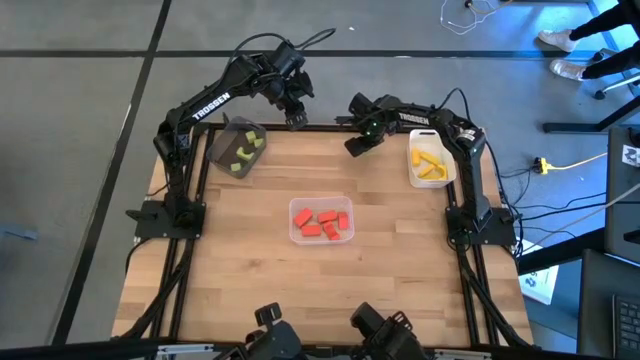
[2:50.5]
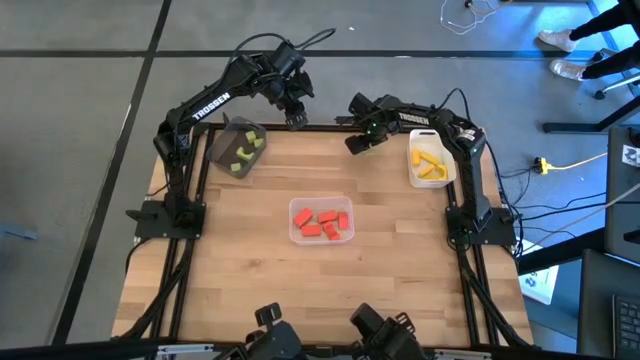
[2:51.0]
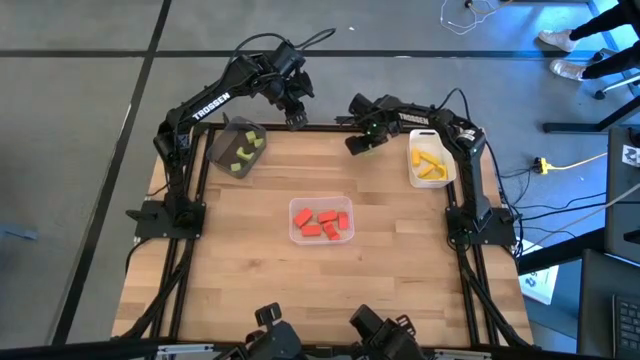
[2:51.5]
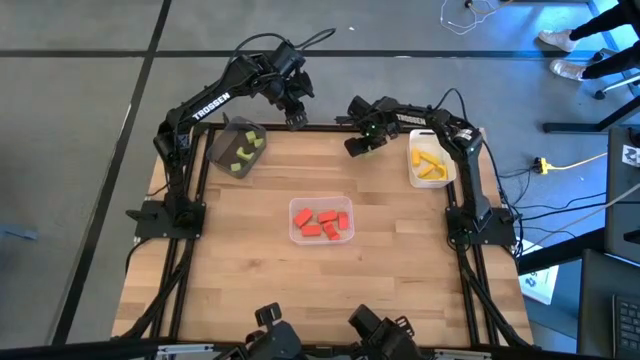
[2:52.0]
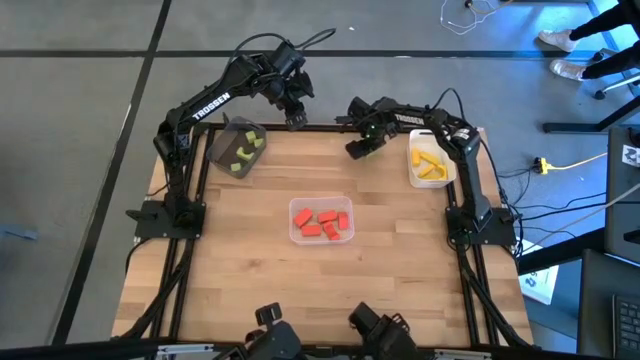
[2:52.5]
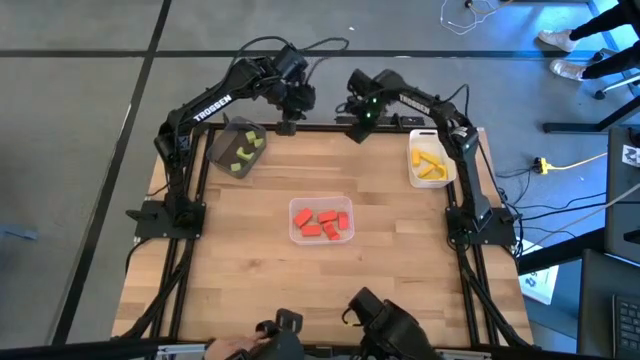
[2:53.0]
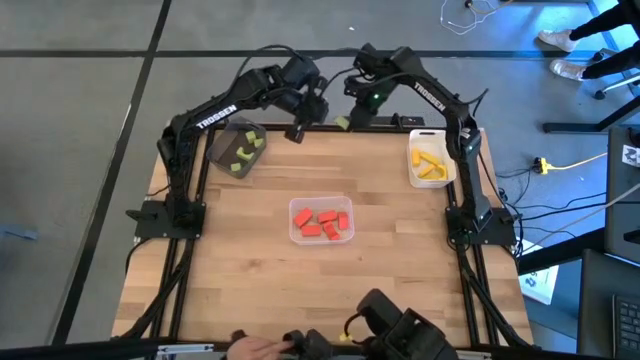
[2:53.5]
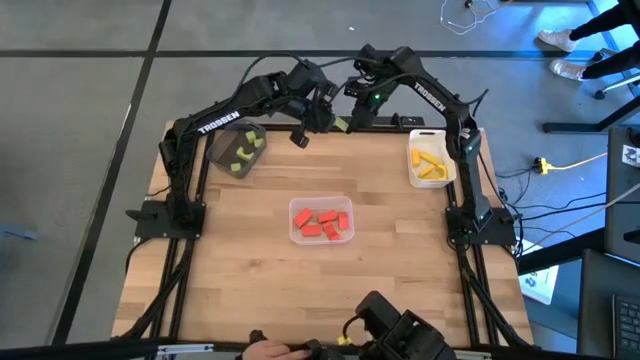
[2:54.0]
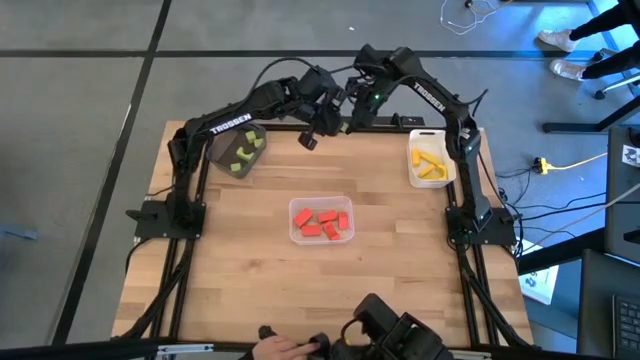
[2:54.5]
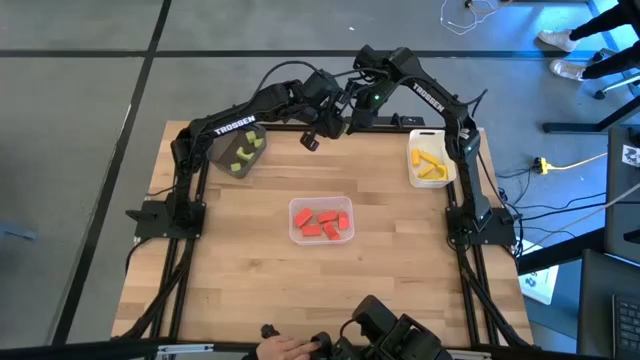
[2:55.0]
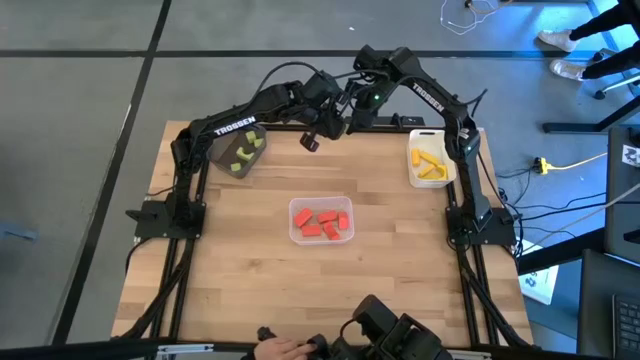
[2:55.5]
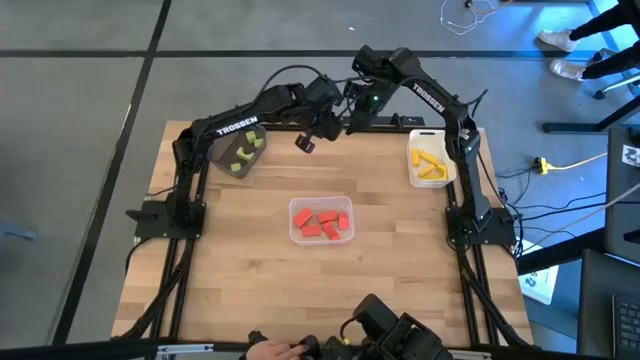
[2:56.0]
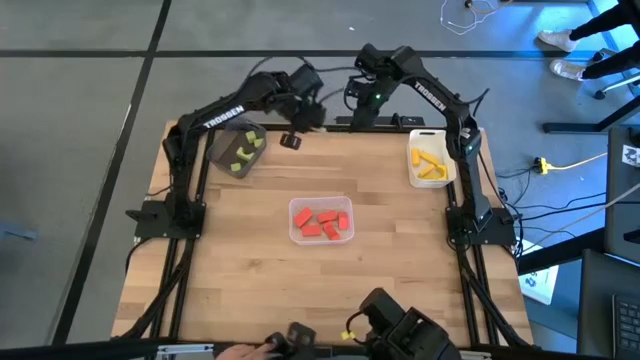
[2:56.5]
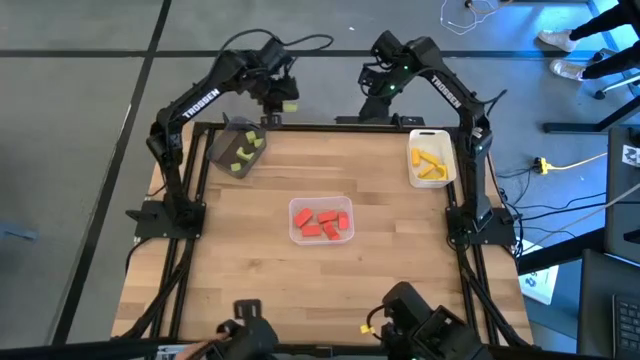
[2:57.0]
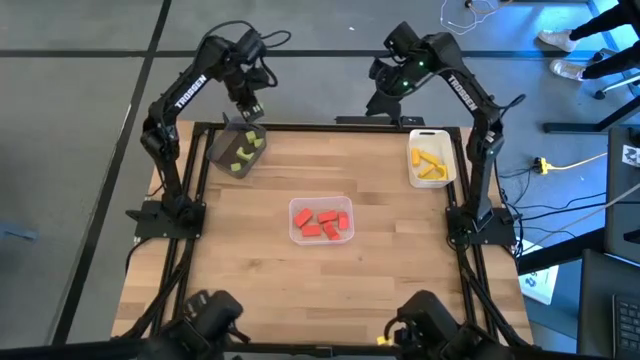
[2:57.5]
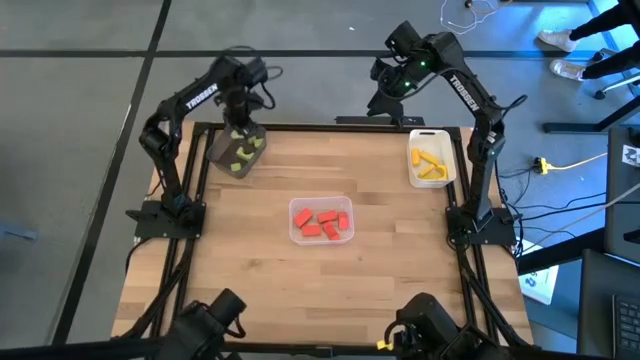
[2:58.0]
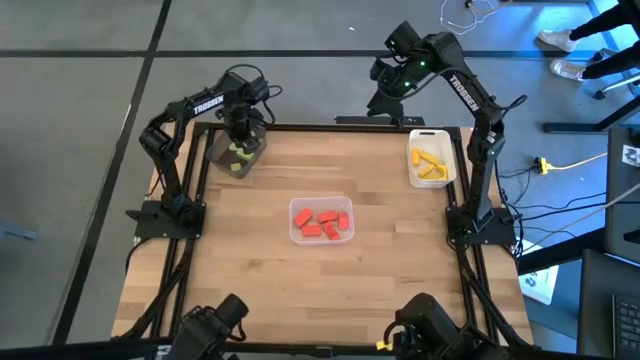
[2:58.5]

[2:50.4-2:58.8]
Task: Sort & place blocks by color
Put the green block into the black bin

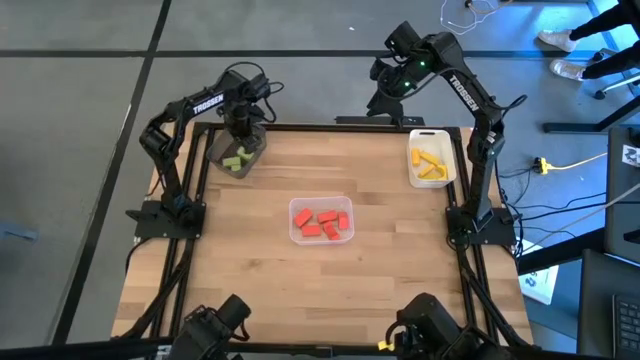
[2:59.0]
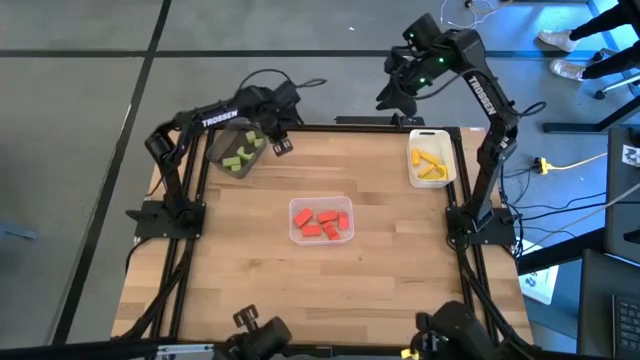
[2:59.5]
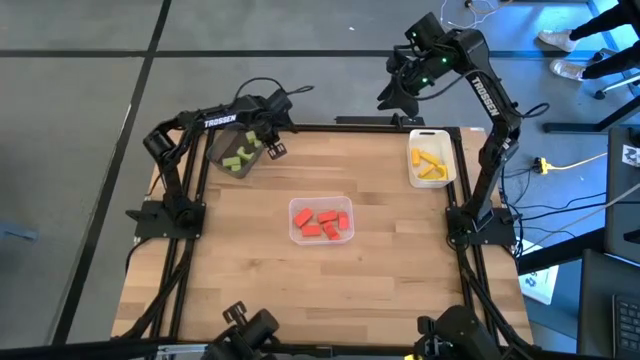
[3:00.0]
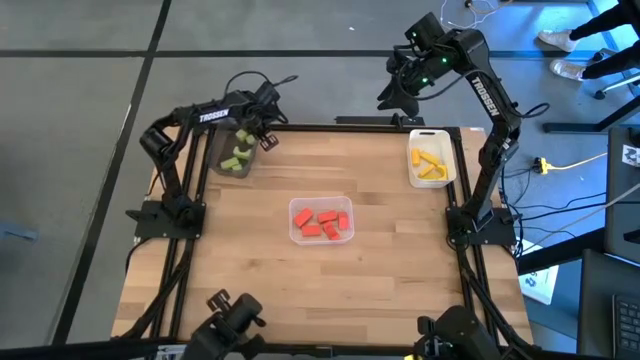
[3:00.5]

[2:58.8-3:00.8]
Adjust the black bin

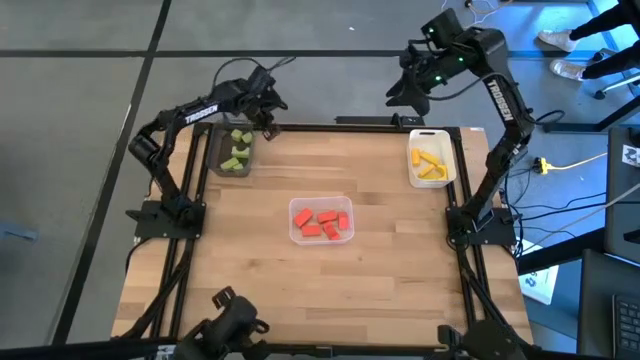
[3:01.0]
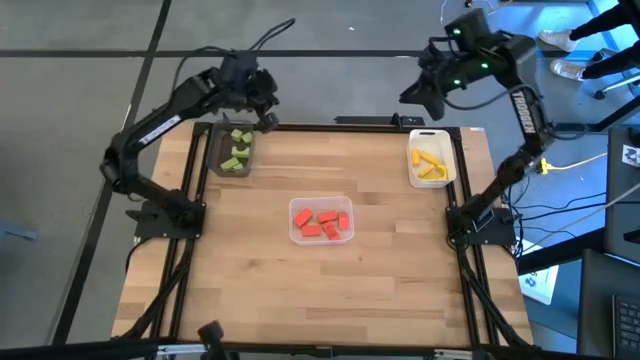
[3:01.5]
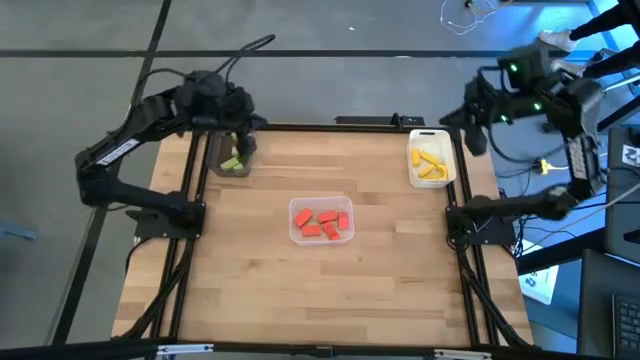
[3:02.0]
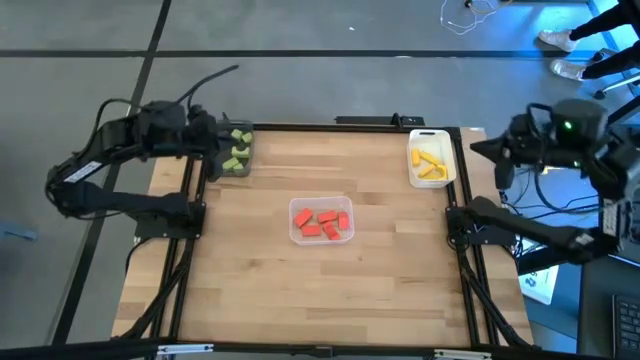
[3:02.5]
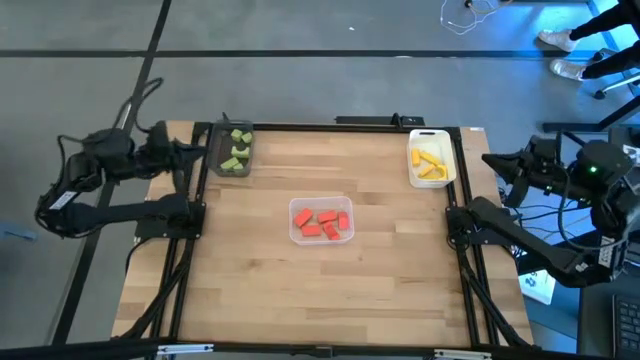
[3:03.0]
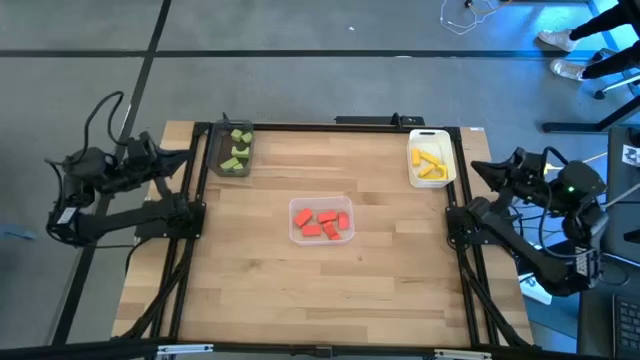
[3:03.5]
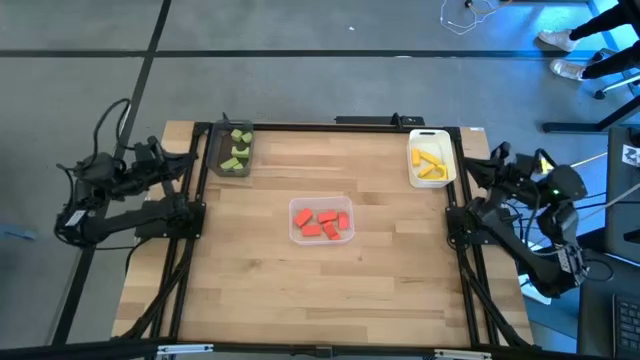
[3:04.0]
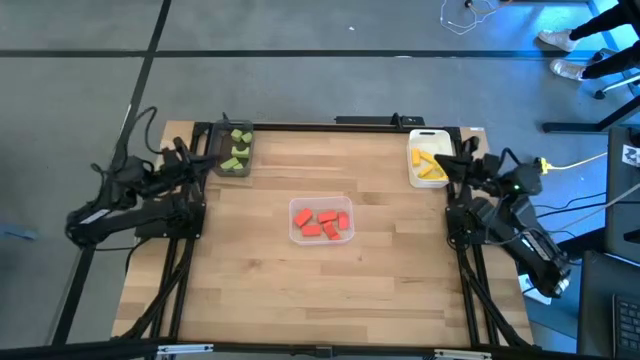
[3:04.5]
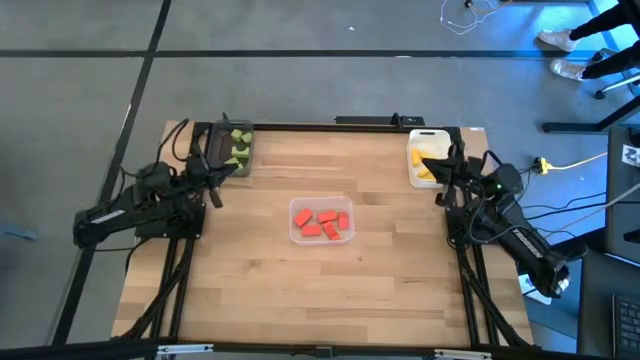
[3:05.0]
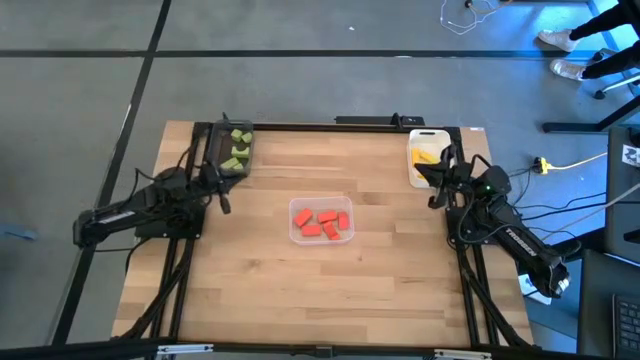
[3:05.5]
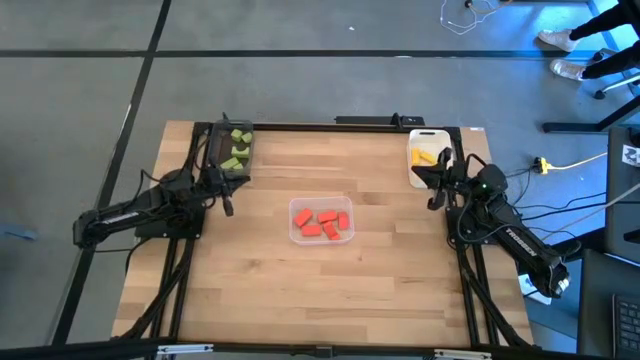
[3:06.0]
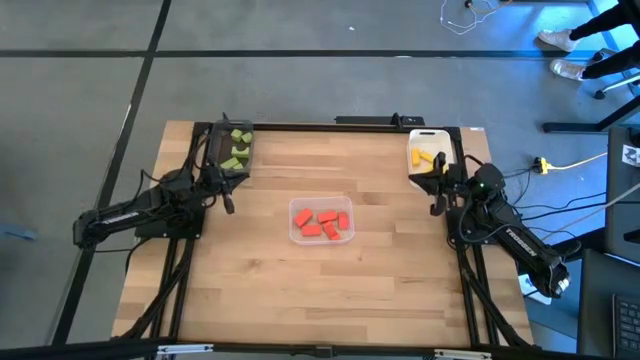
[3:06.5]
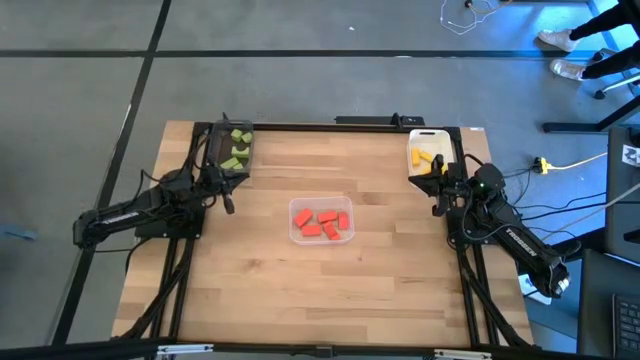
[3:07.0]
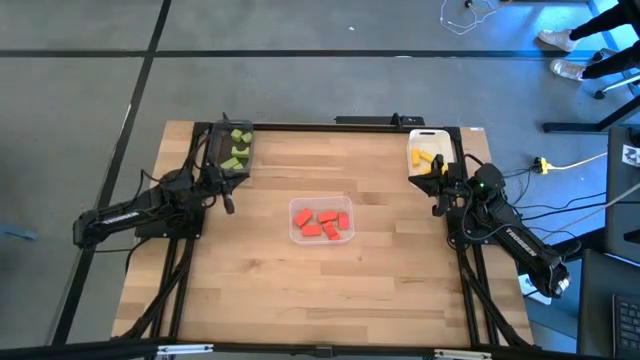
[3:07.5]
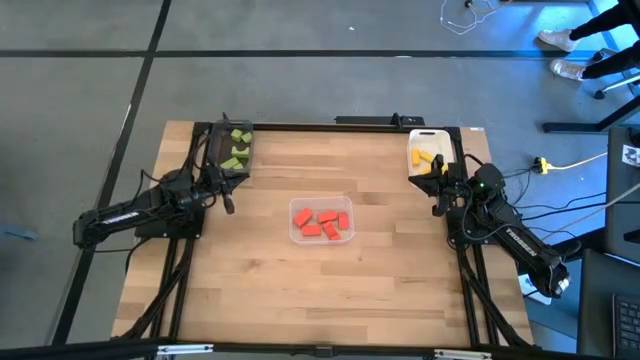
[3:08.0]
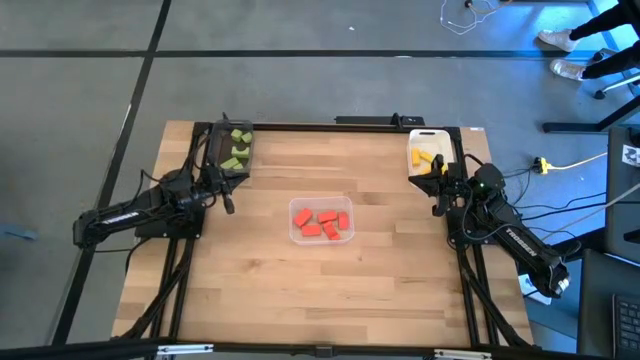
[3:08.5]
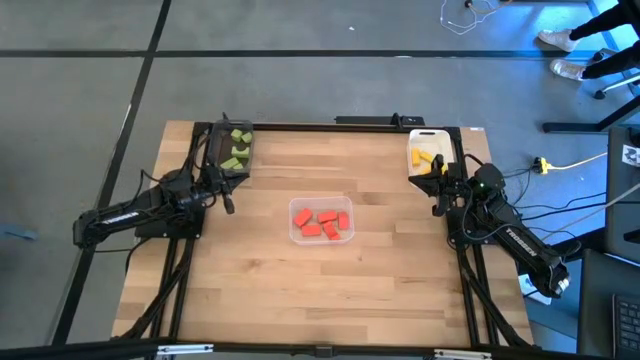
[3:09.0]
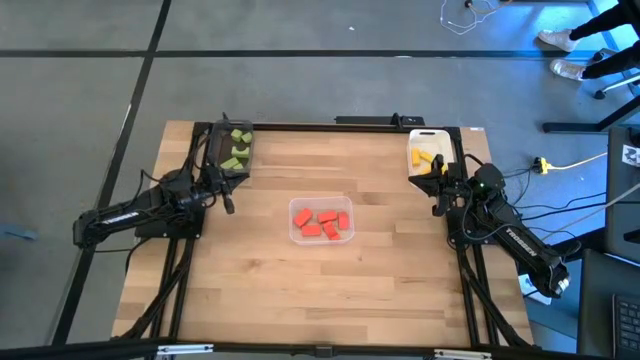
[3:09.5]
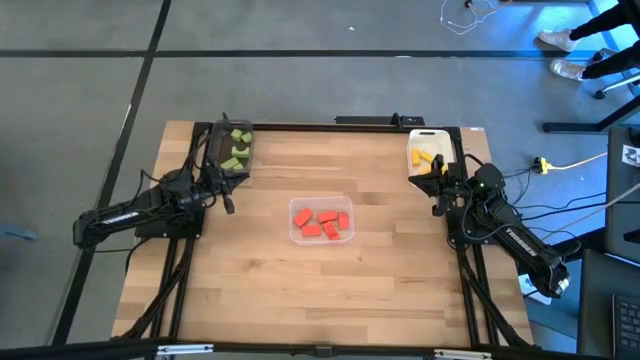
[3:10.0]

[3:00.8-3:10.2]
Return to Home Position

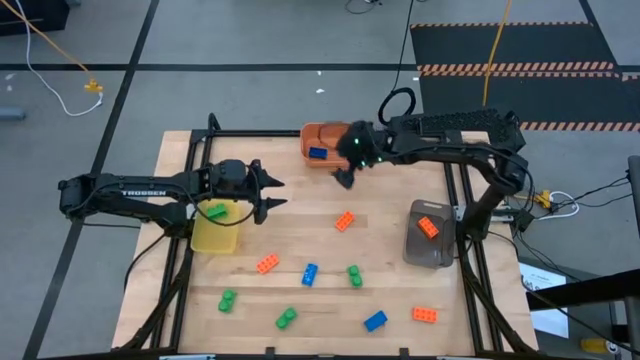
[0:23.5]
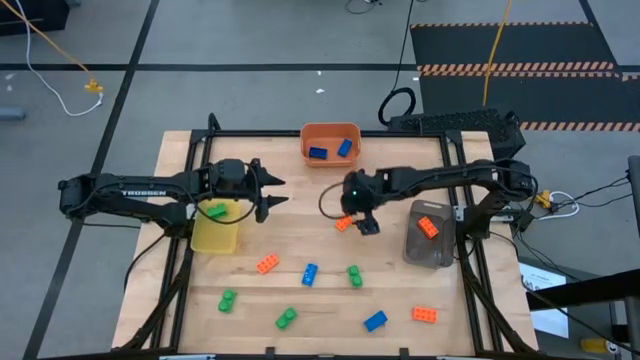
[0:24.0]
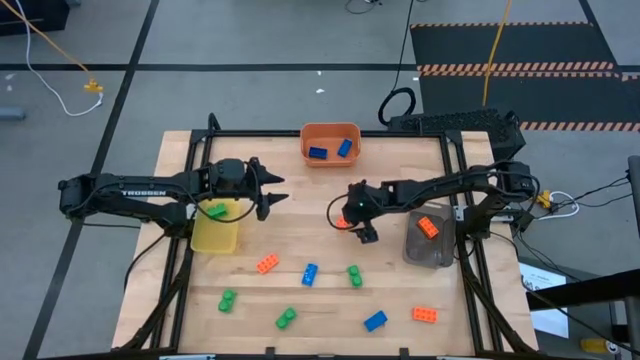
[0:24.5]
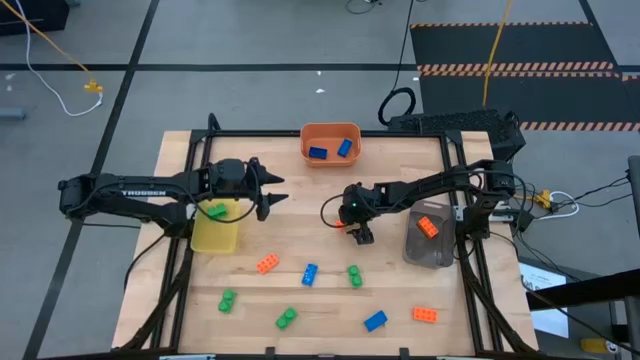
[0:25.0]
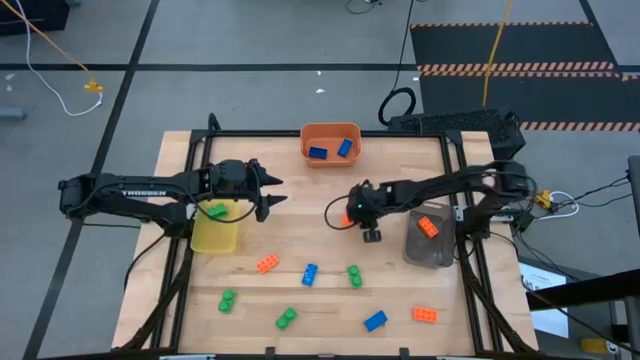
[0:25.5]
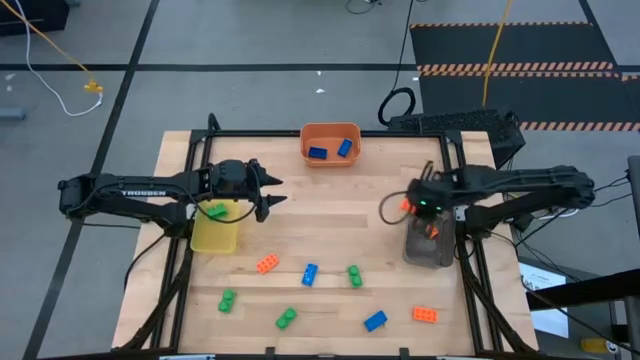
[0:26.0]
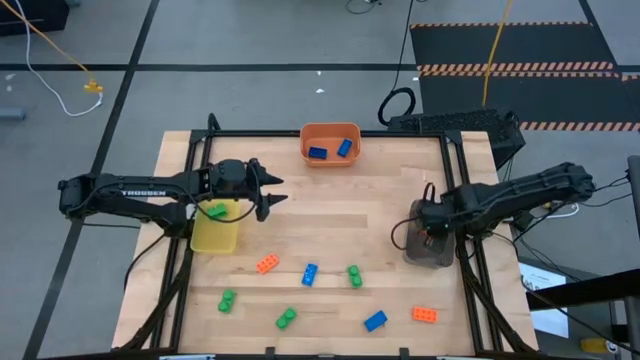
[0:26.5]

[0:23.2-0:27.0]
Task: Sort & place blocks by color
Put the orange game piece into the black bin
